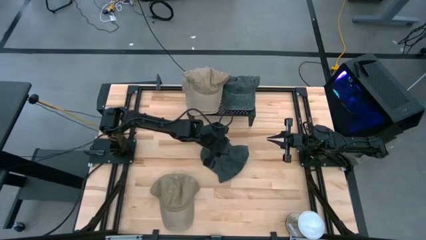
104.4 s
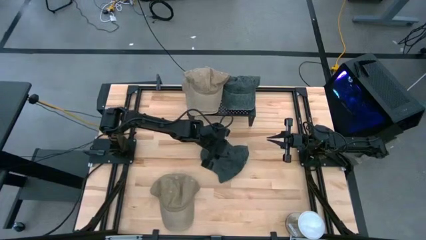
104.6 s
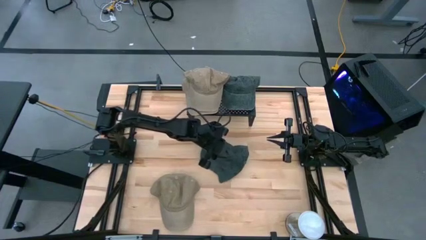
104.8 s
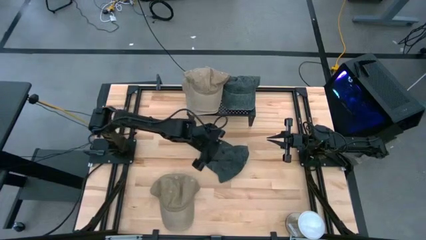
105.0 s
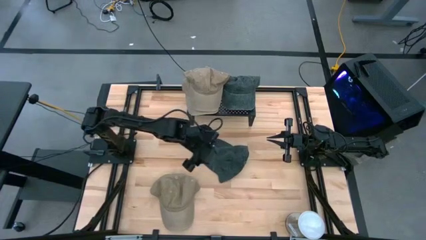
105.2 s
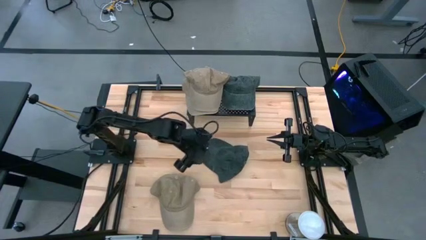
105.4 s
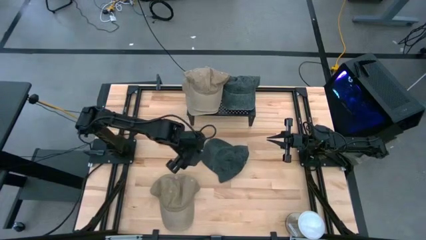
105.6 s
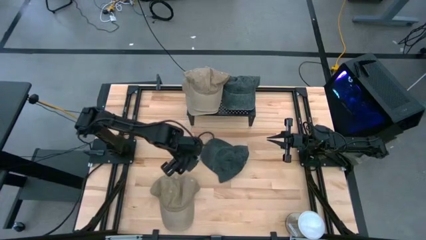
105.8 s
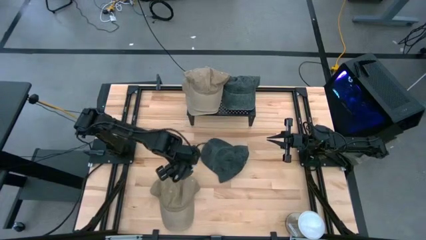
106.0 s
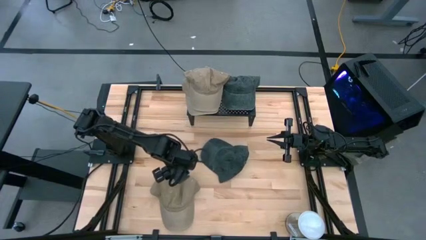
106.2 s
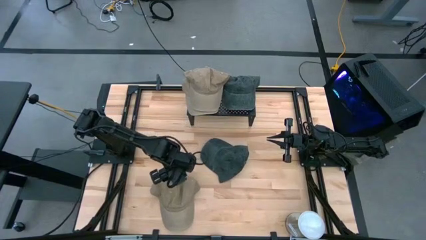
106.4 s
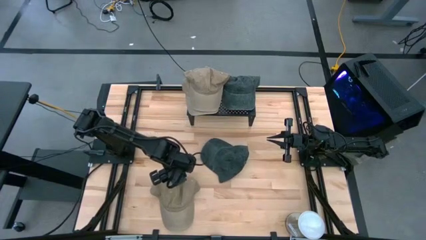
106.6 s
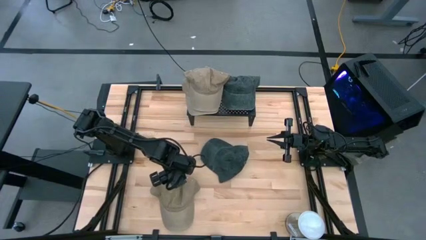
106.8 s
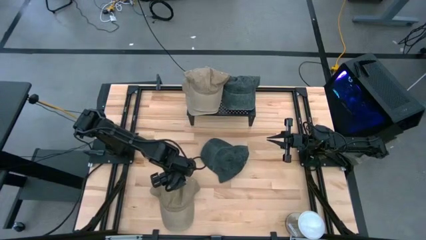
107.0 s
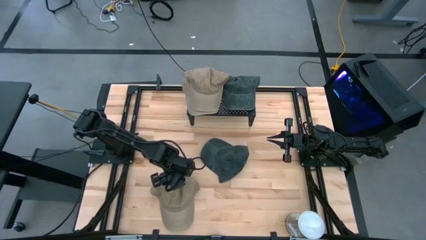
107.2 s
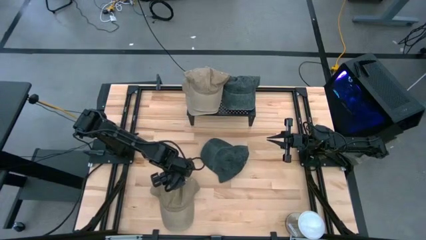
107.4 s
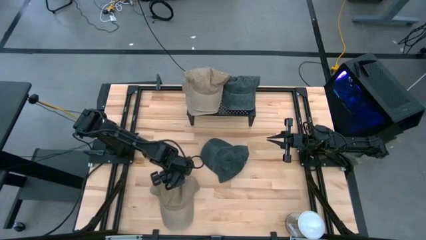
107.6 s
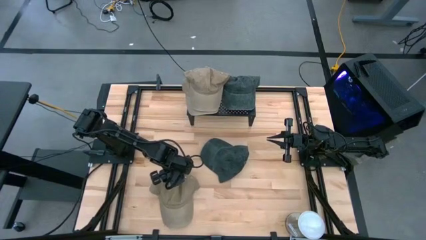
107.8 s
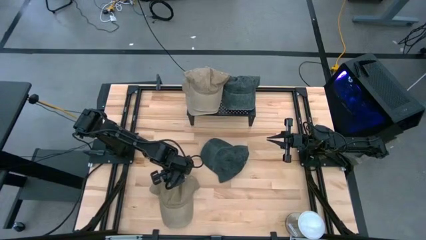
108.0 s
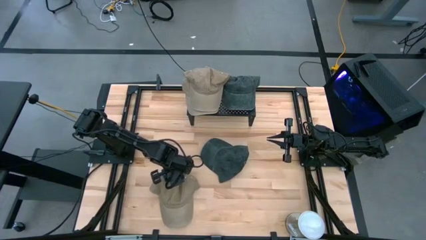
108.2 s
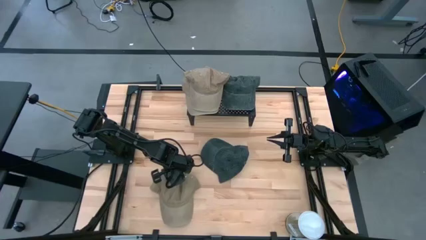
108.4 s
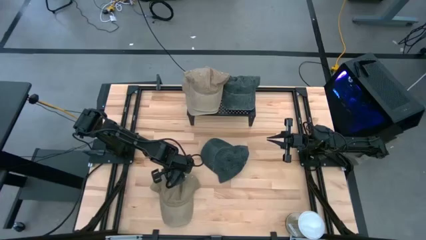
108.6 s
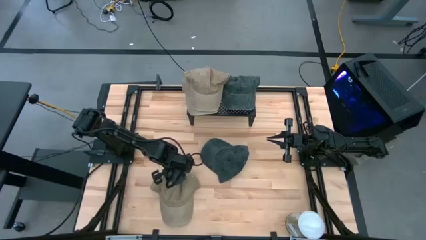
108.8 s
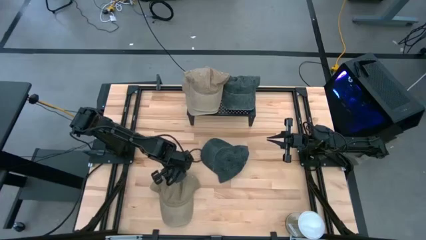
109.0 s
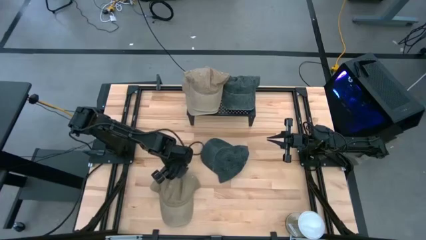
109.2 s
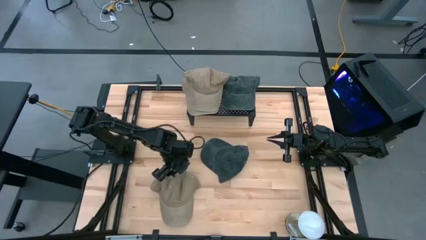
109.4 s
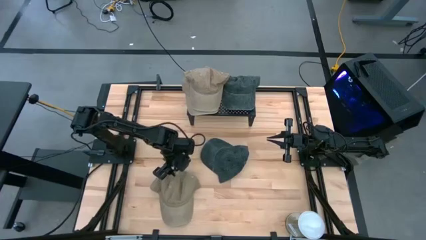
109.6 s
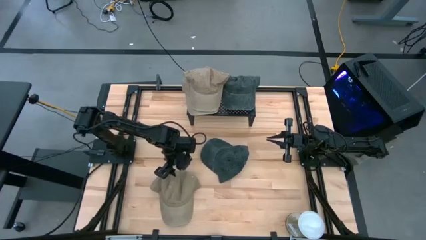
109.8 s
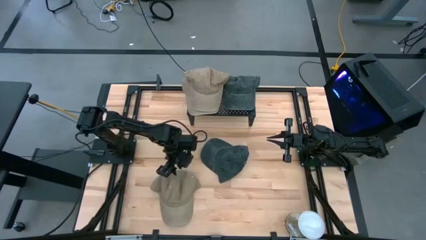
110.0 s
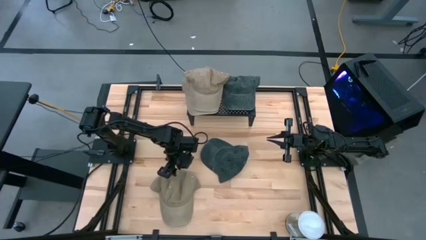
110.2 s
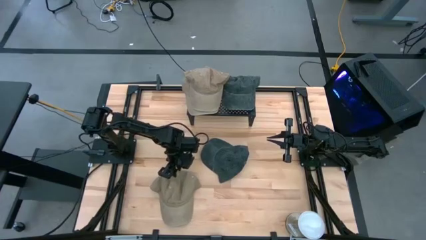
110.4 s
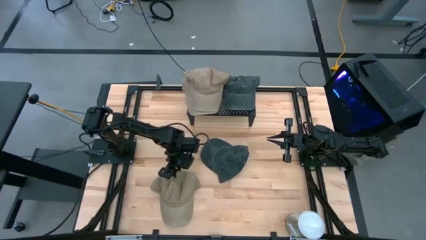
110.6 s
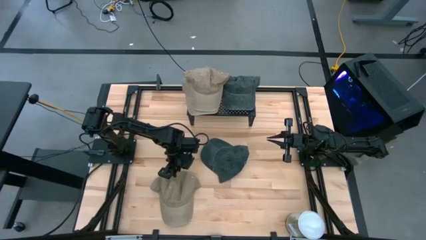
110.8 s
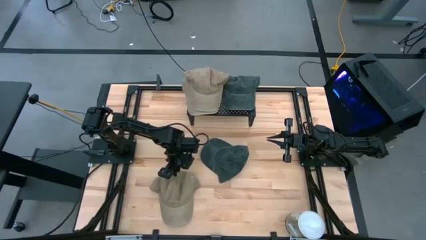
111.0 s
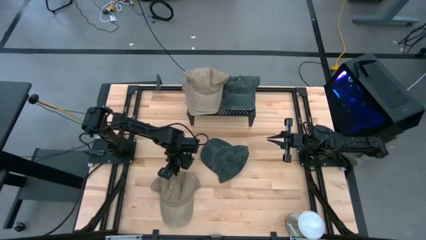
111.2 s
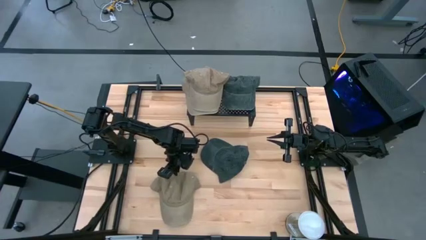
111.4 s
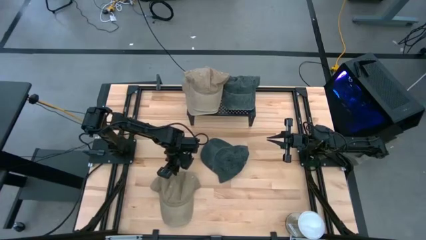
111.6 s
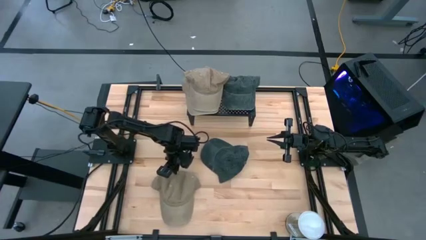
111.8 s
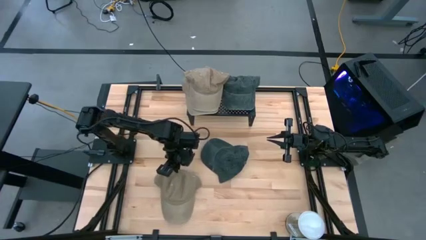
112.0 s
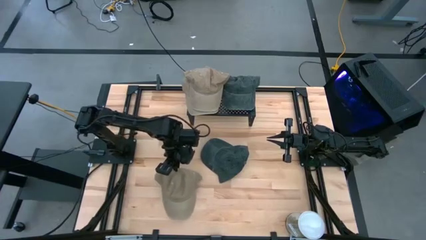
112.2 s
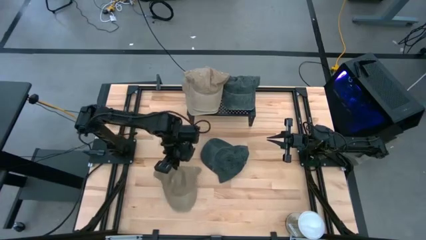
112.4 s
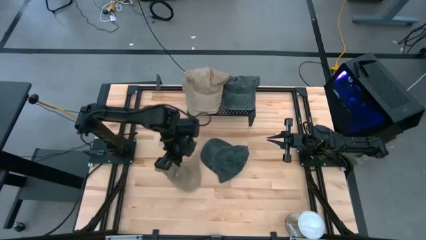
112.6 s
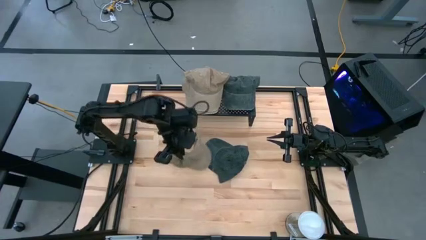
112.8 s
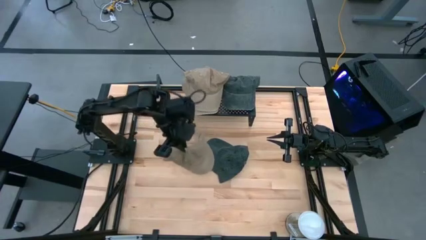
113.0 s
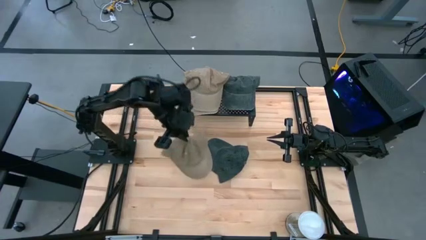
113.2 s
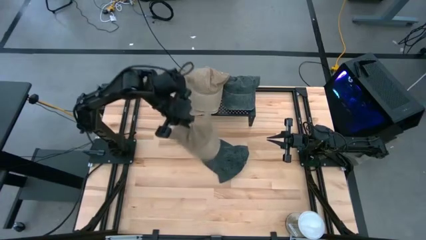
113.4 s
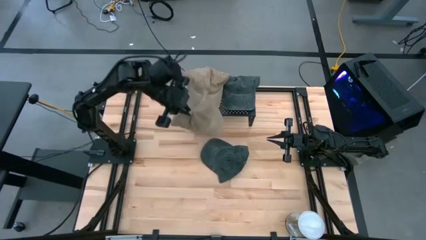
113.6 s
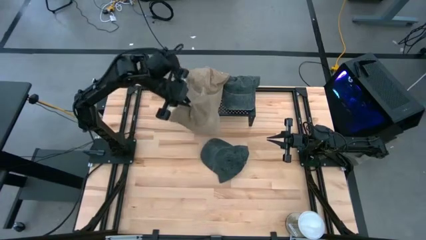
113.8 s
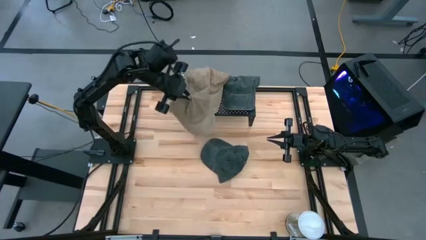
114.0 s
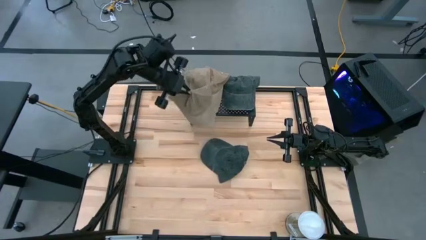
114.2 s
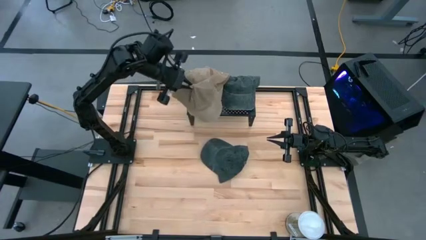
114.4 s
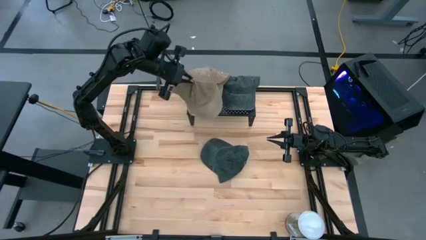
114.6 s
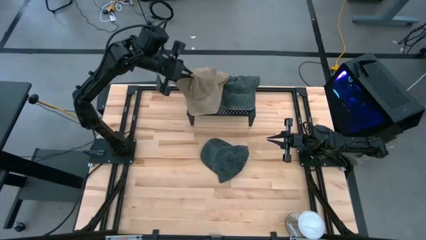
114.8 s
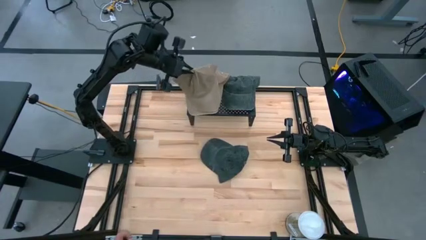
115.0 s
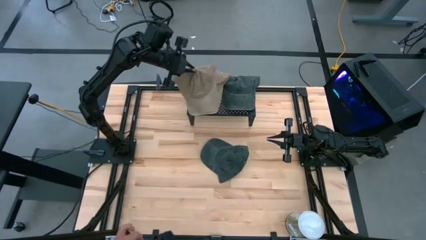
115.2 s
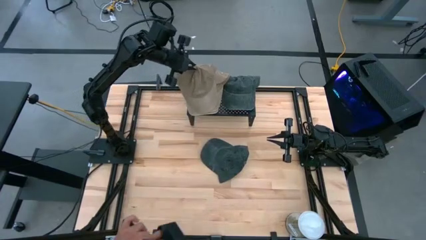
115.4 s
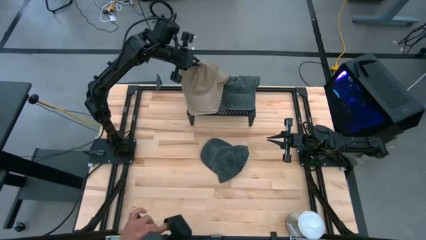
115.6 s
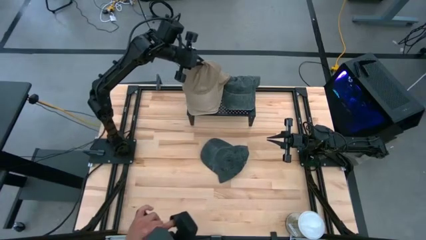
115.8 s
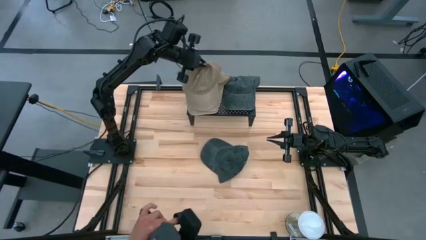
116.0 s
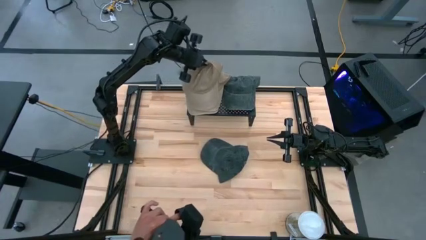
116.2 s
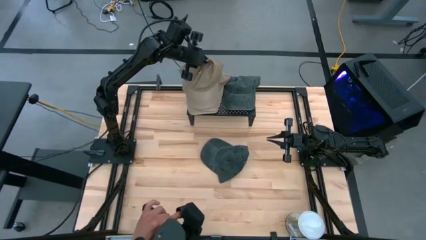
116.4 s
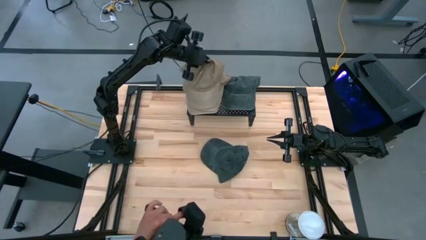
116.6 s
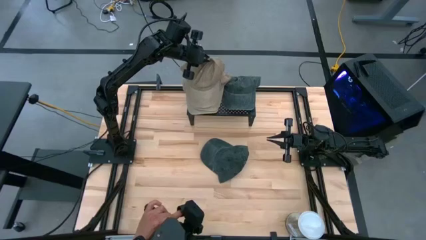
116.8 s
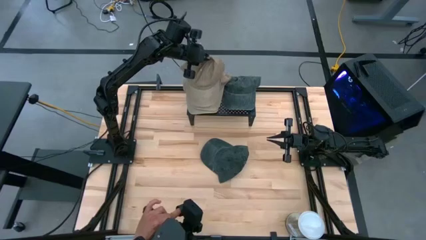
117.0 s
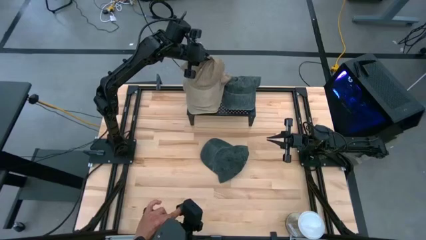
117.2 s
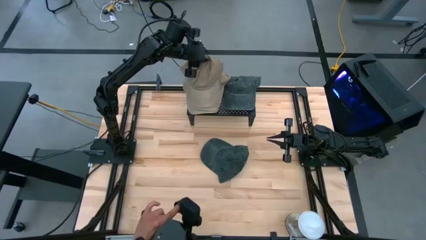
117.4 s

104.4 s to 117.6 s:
Task: Pick & Place hat
Stack the brown cap on the other brown caps on the shelf

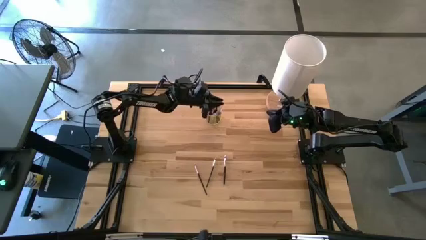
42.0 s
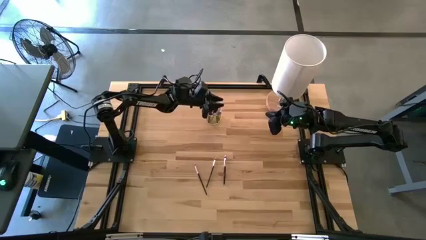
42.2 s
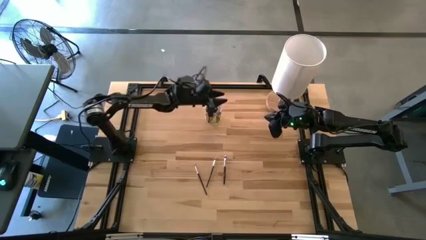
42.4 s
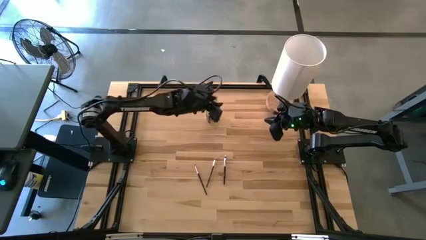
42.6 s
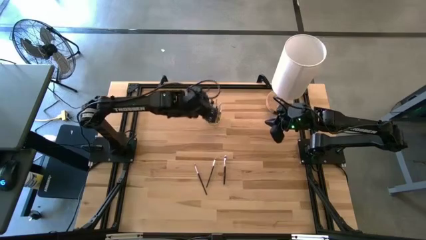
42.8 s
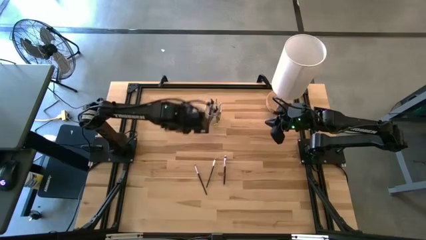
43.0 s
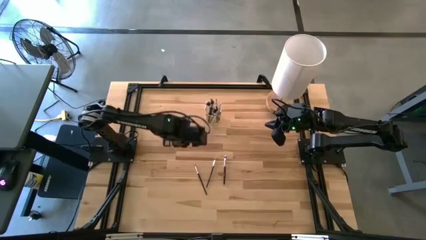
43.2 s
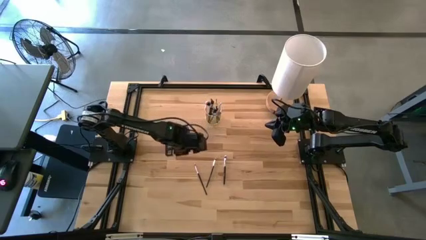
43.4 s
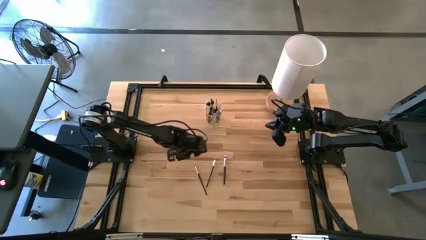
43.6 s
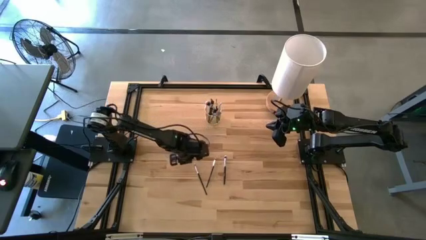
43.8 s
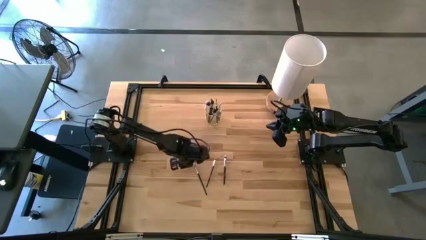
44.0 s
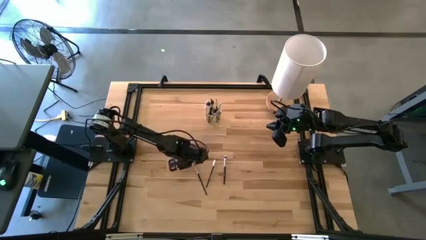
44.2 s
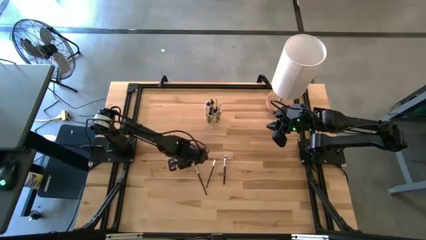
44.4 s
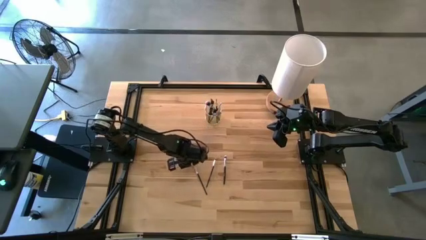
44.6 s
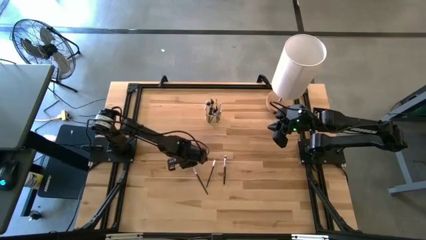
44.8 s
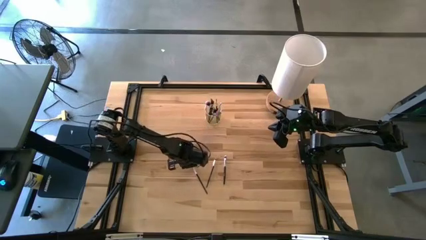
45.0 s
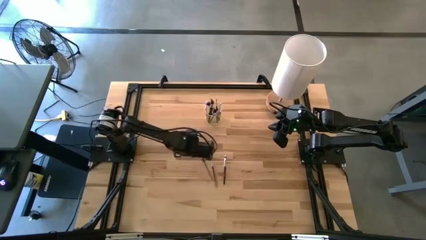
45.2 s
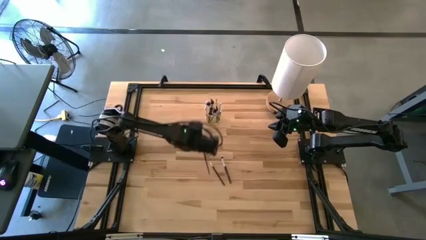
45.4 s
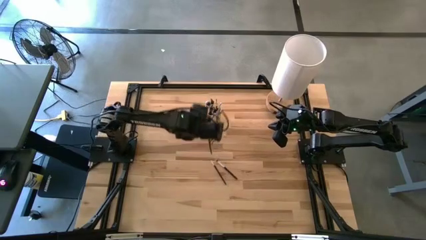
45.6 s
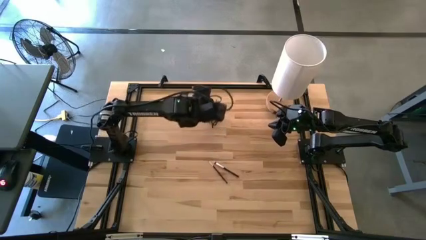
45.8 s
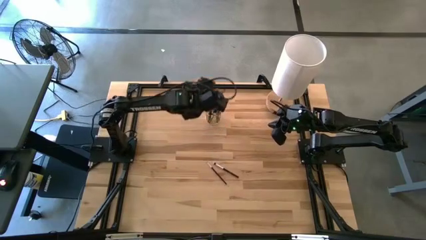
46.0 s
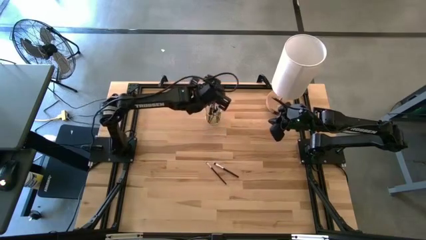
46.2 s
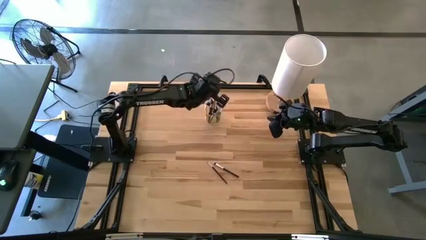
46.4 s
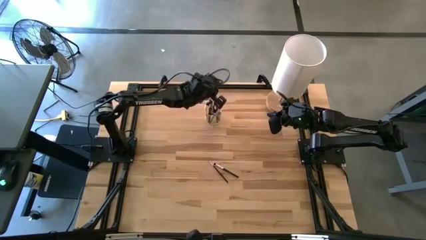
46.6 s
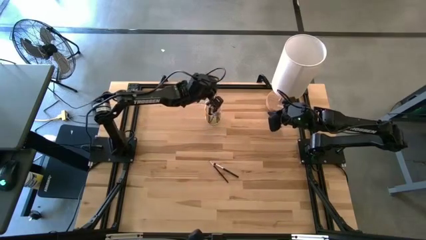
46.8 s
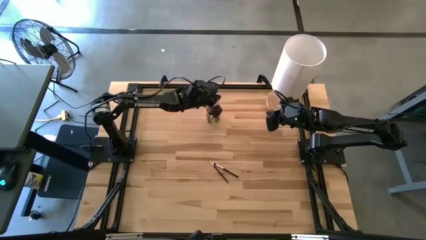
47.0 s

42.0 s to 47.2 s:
Task: Put items in baskets/containers
Put the eyeshadow brush into the pen holder
